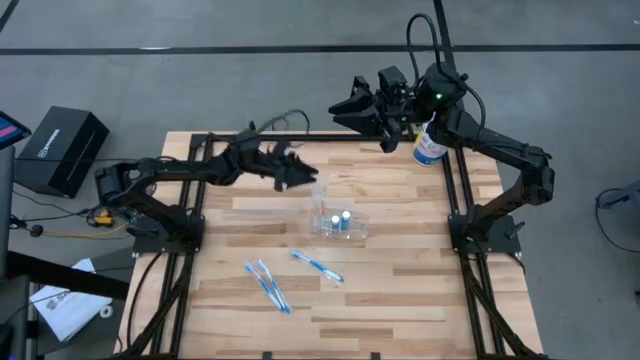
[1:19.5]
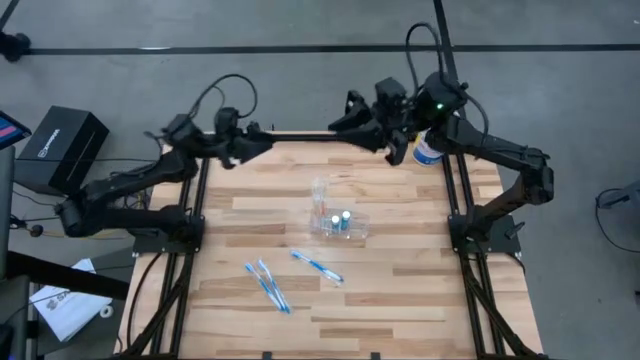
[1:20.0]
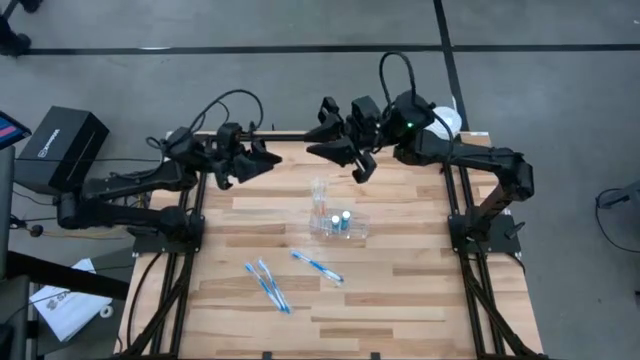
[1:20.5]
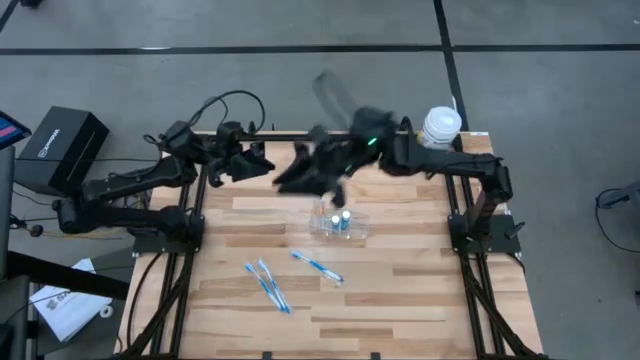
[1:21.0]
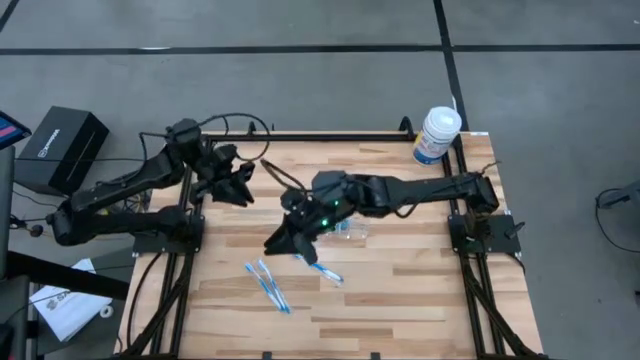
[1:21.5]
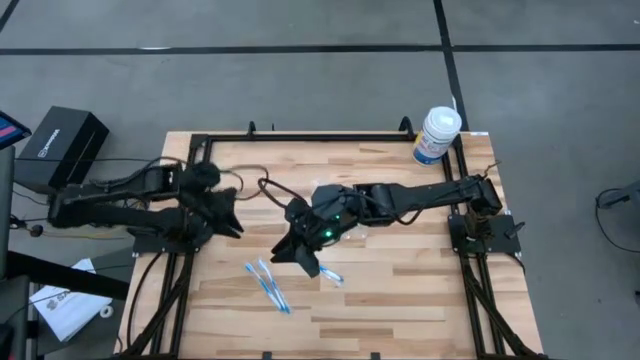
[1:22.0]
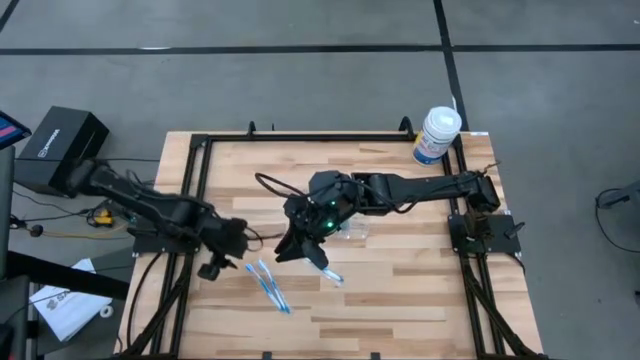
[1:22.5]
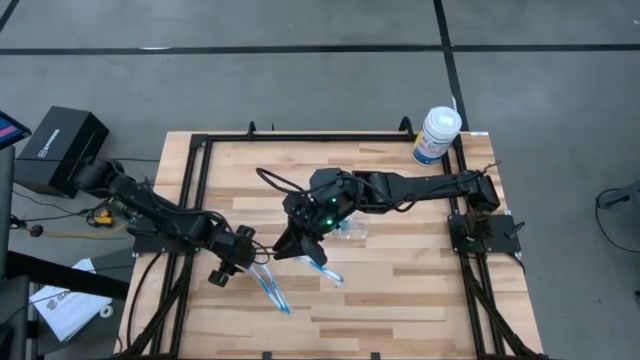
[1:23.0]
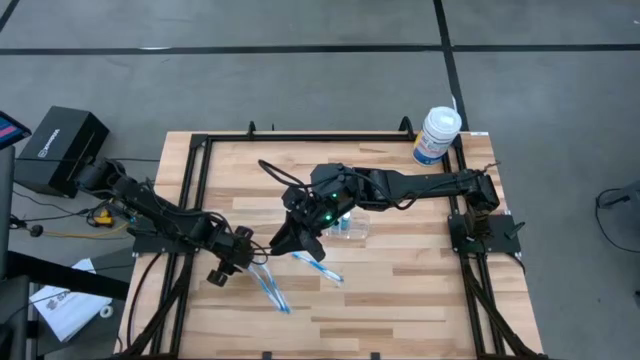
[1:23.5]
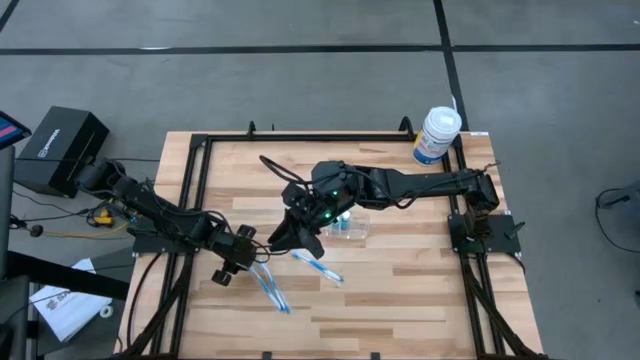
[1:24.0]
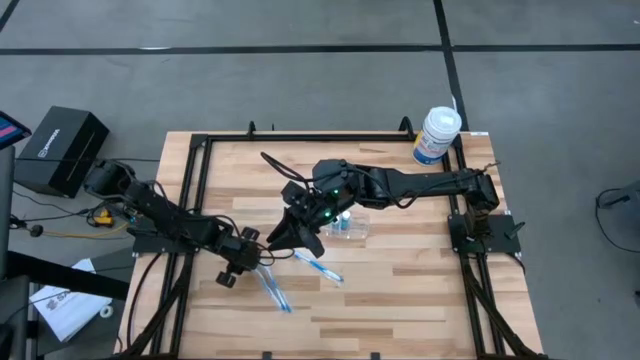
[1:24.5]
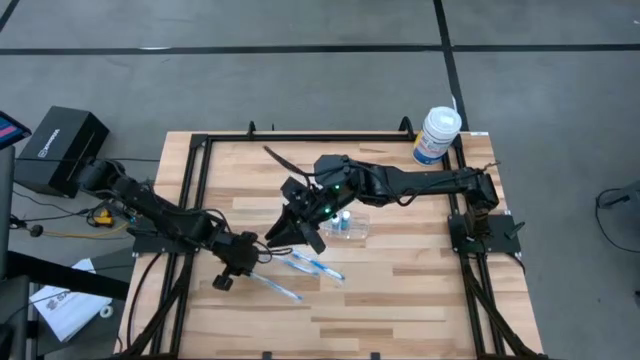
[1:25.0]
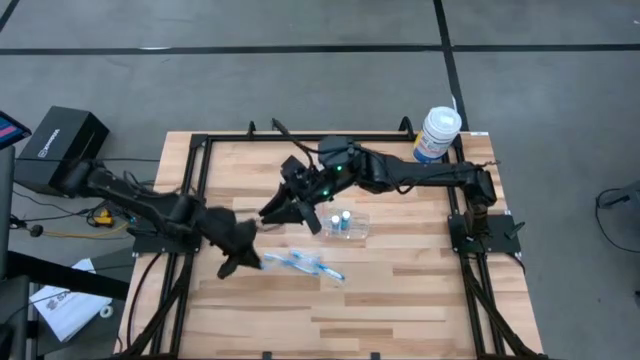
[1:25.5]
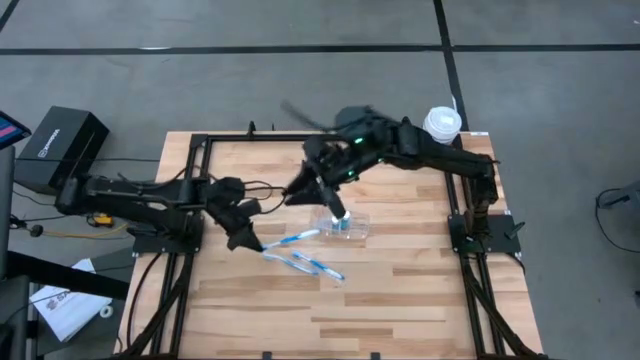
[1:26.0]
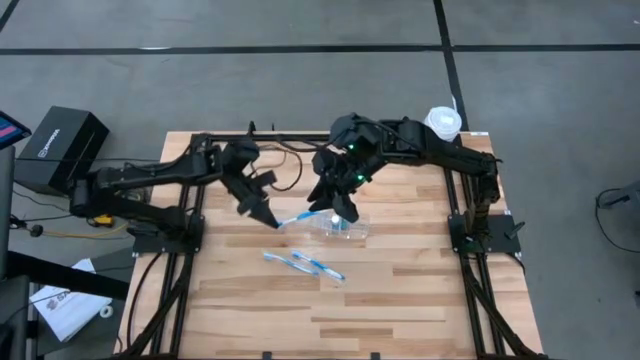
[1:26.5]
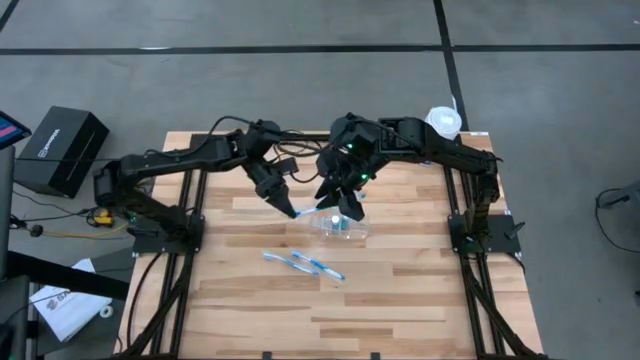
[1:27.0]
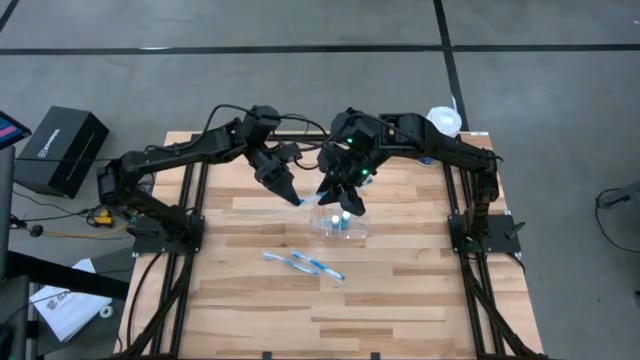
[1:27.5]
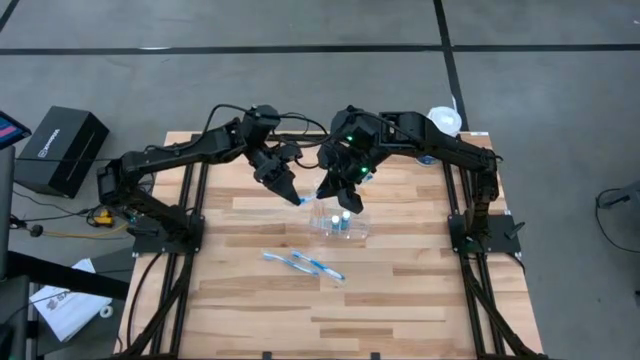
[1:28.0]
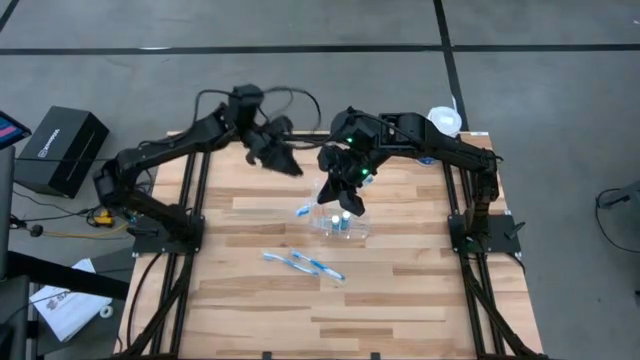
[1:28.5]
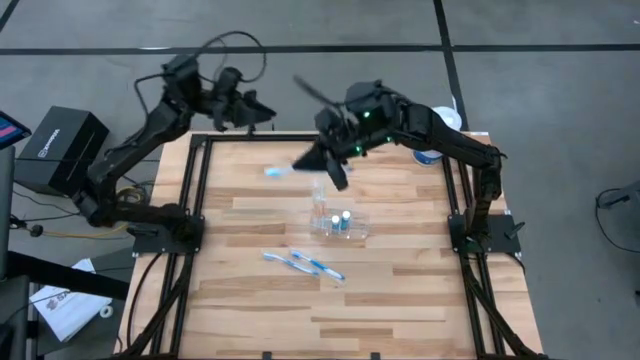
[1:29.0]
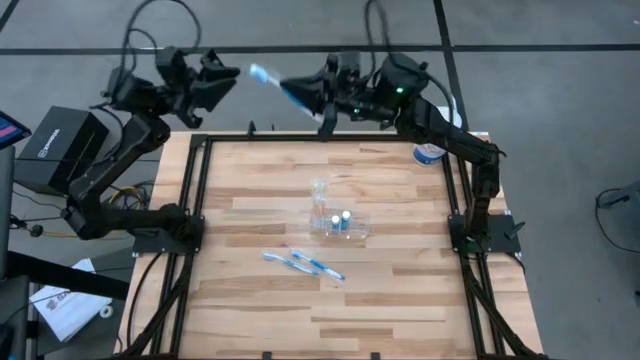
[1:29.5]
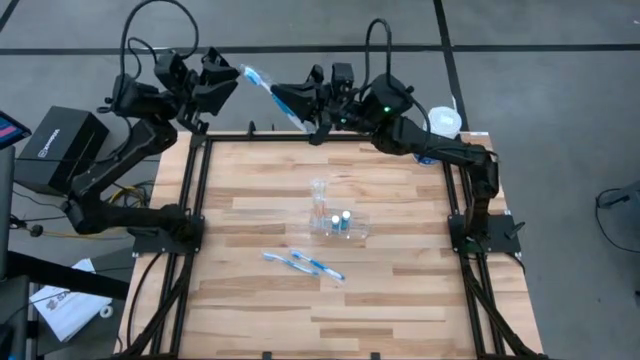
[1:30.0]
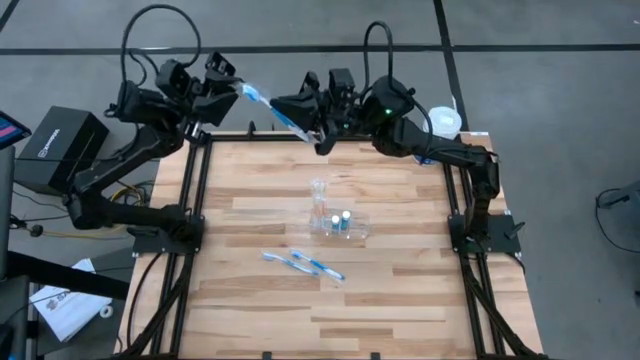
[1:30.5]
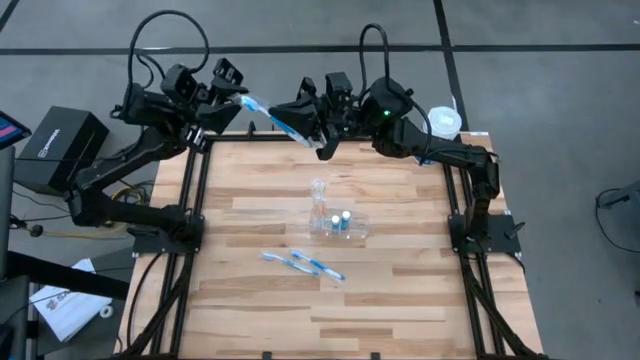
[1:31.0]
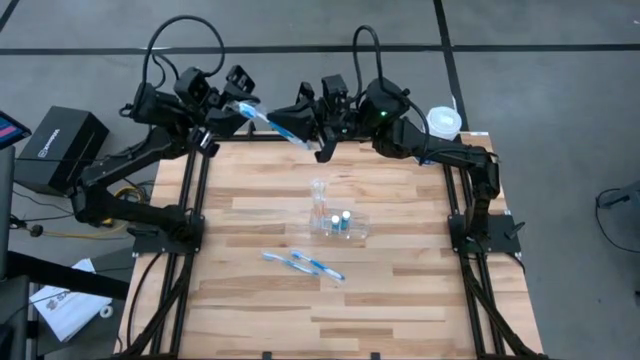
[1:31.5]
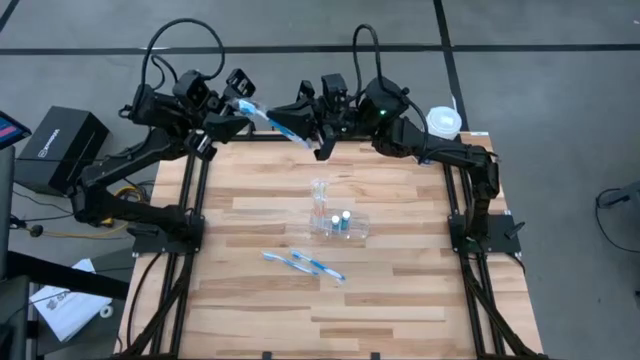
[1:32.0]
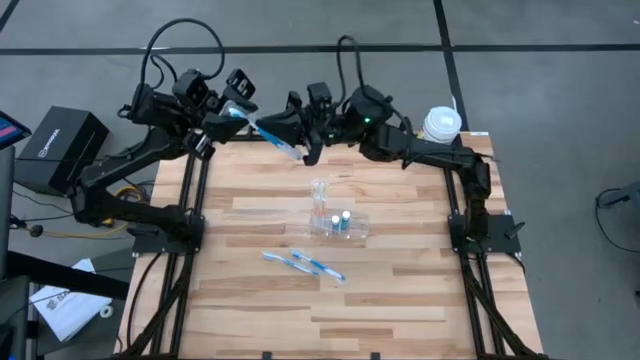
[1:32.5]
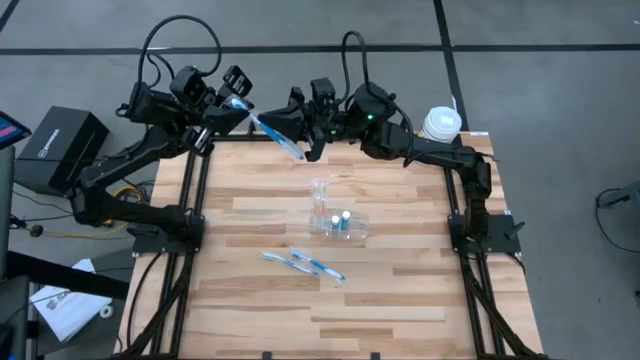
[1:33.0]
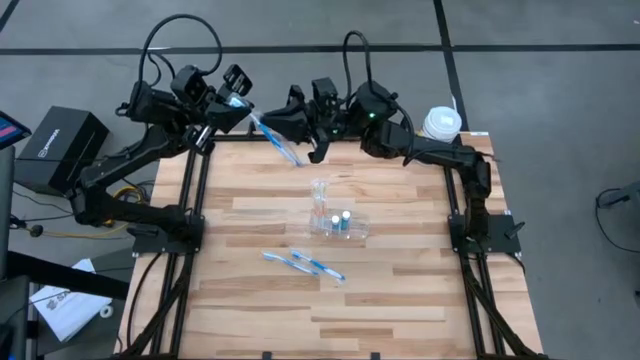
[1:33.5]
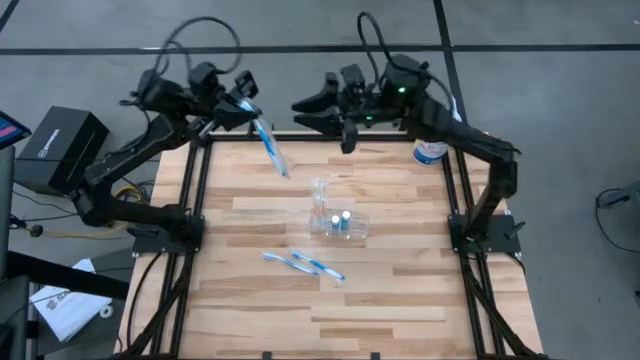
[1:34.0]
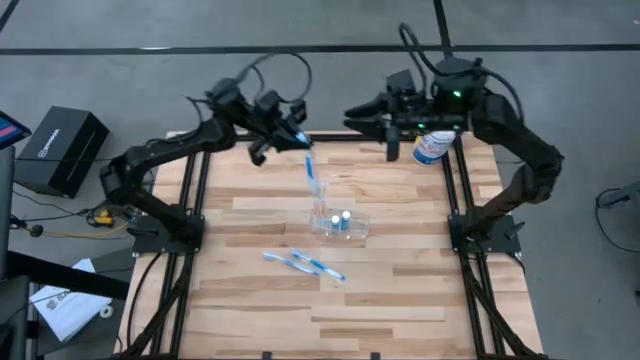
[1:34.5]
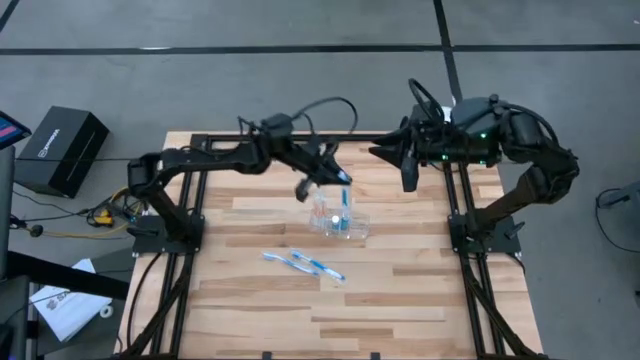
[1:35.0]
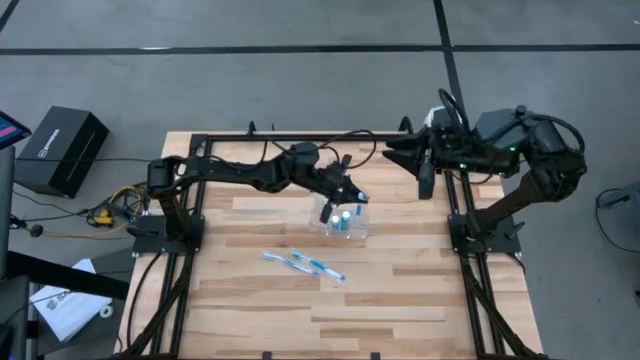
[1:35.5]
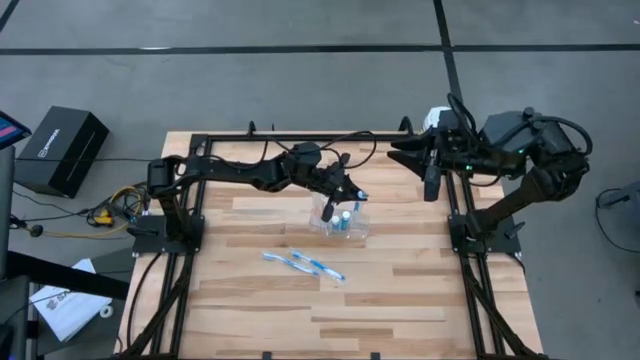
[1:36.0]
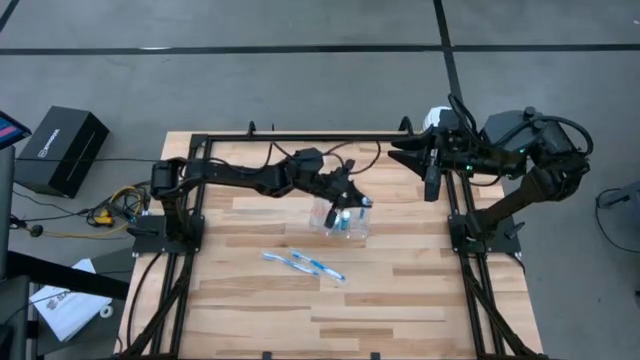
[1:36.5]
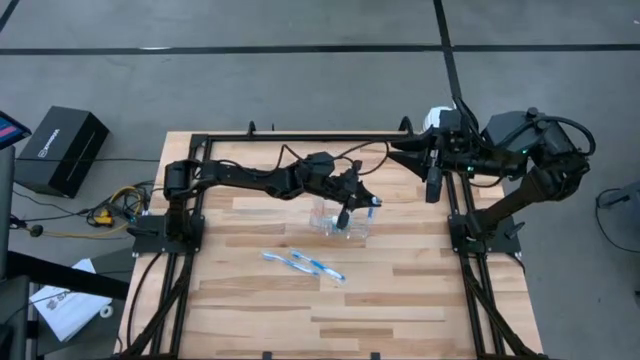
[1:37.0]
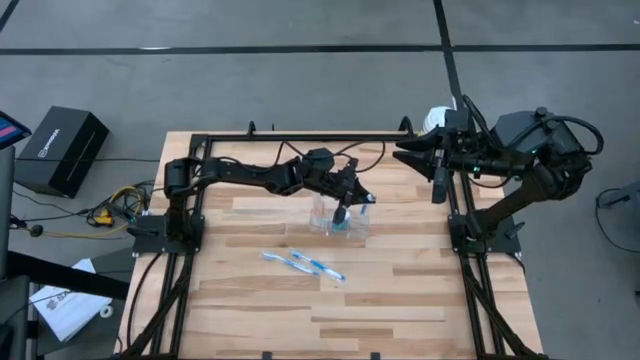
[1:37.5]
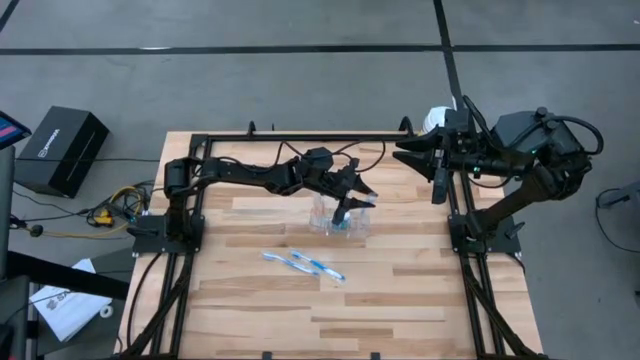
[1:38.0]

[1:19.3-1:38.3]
Task: Pick & Place toothbrushing station
Put the left blue toothbrush into the transparent organizer

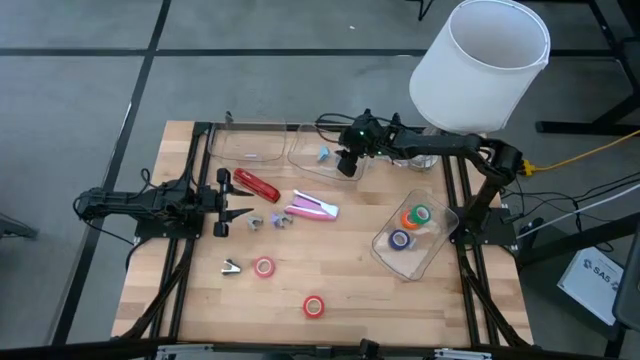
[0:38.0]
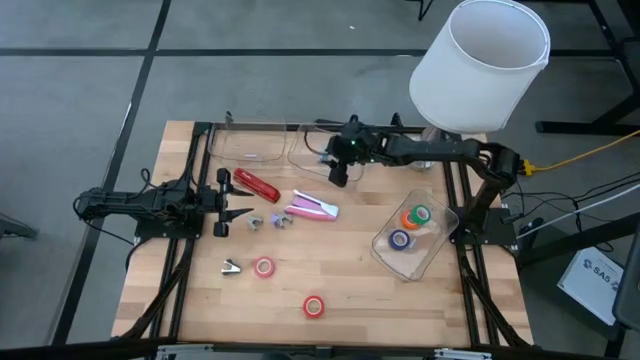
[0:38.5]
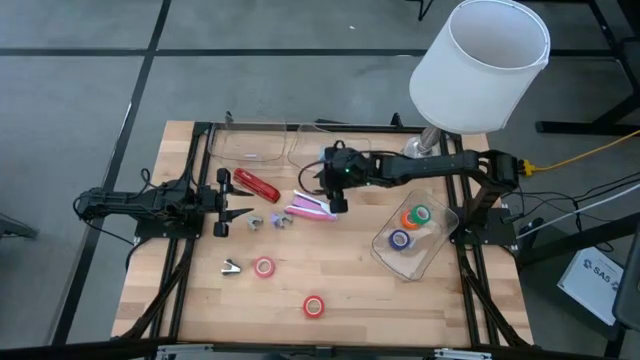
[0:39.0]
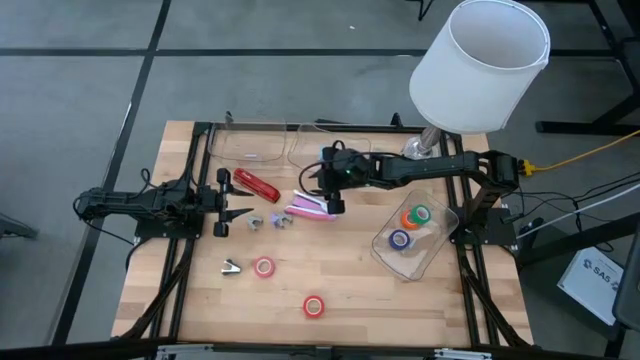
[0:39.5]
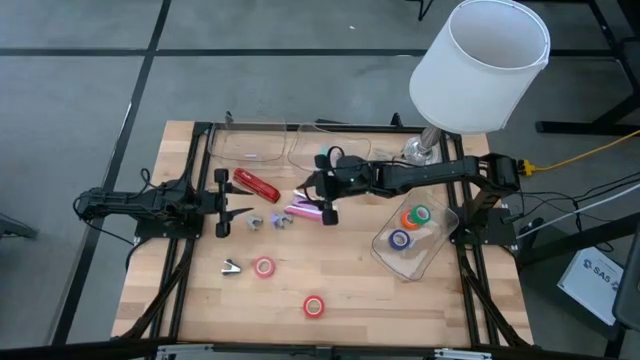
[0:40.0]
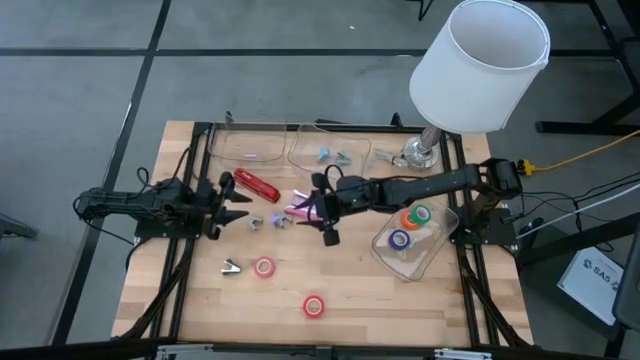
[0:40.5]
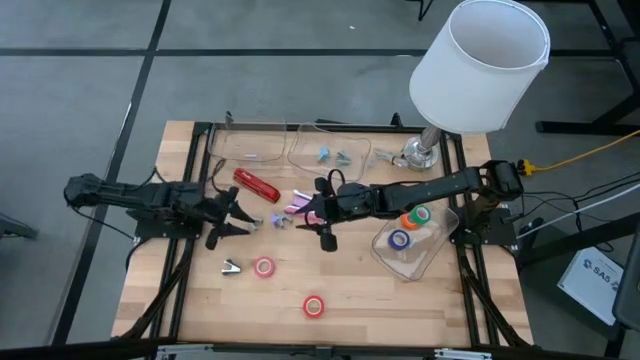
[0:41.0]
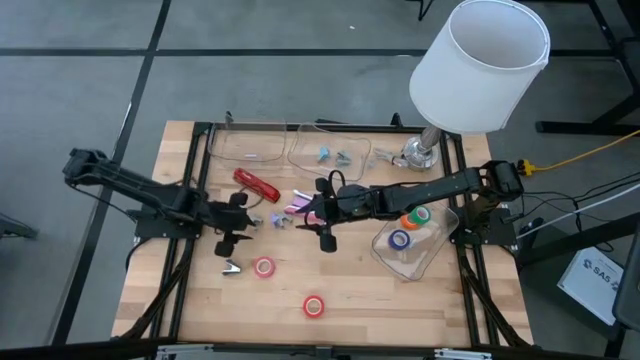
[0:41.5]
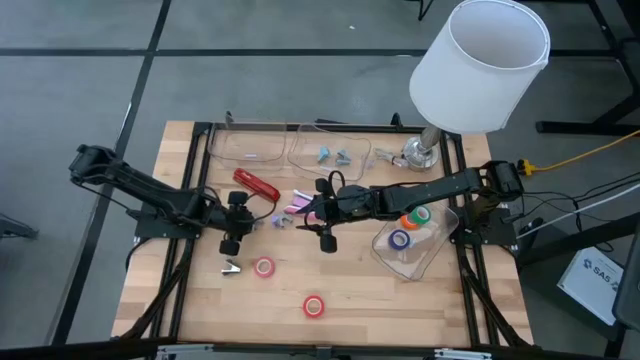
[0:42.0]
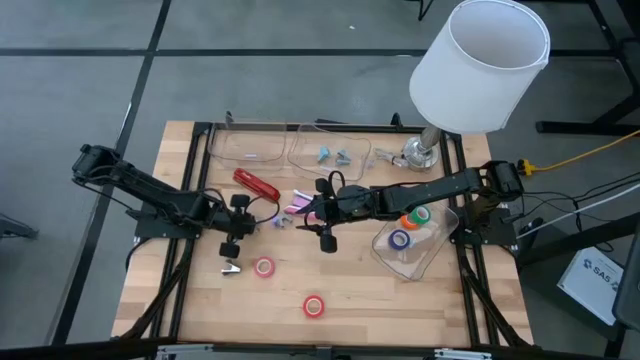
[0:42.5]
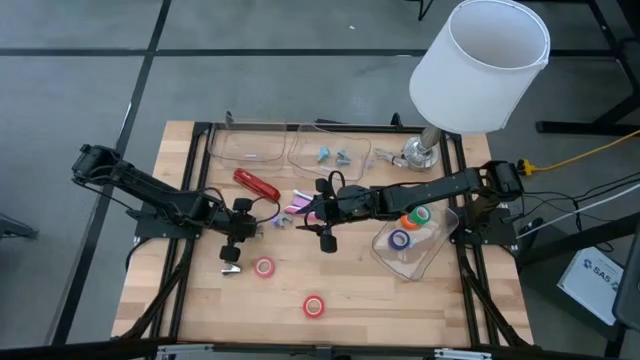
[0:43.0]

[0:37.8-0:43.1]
Task: Pick and place Stapler, Stapler remover, tape
Put the left gray staple remover into the top right transparent bin
